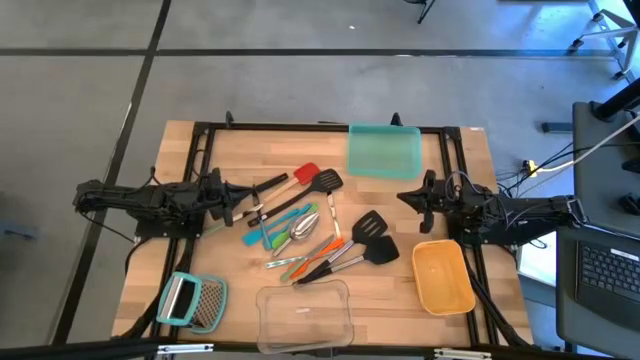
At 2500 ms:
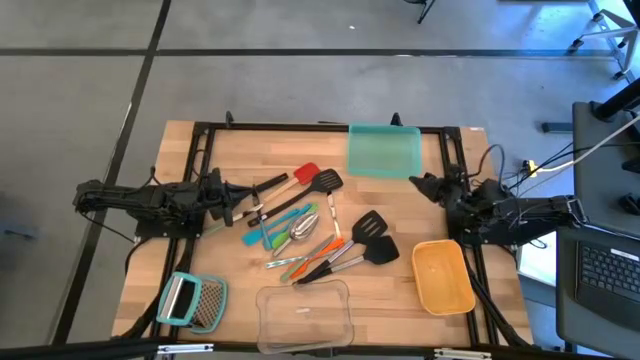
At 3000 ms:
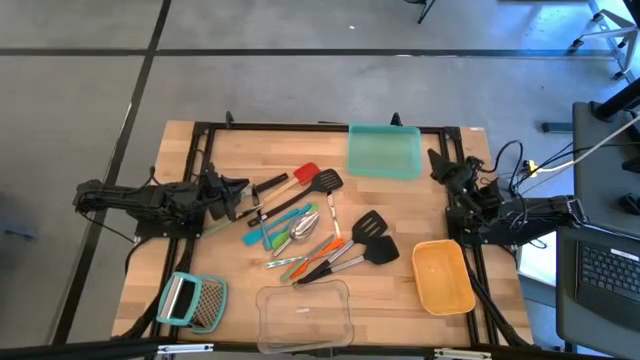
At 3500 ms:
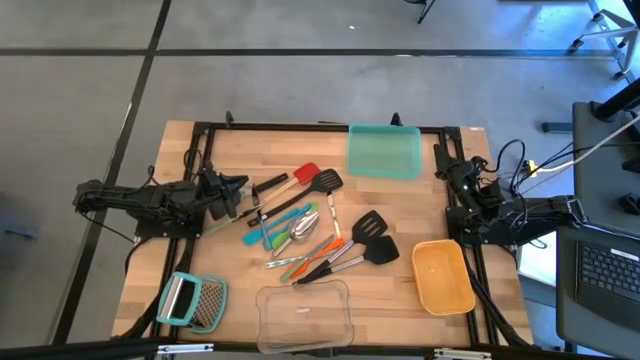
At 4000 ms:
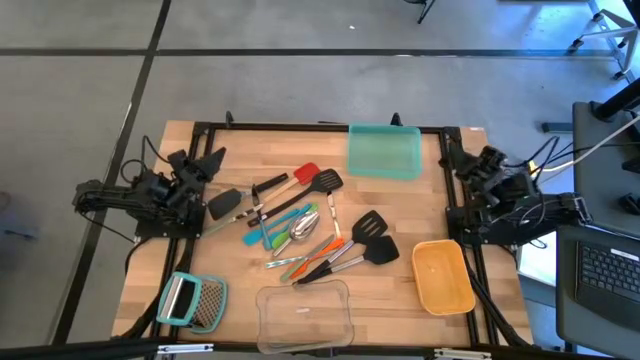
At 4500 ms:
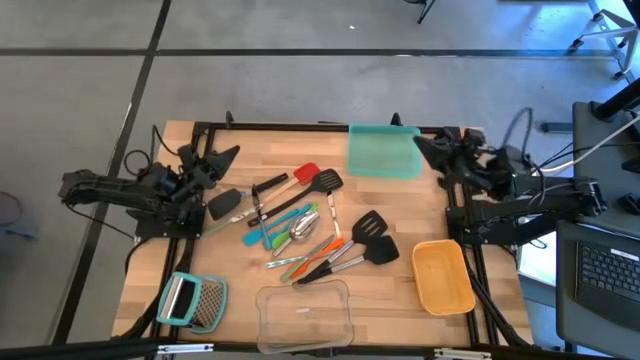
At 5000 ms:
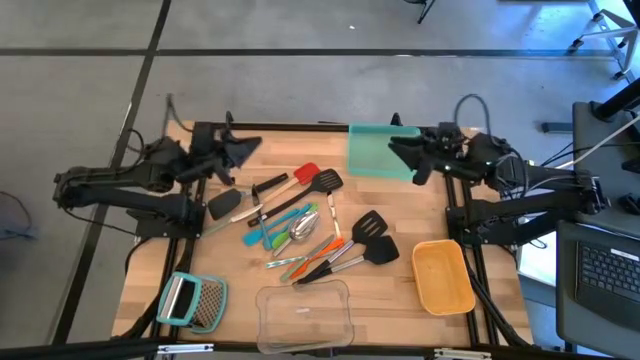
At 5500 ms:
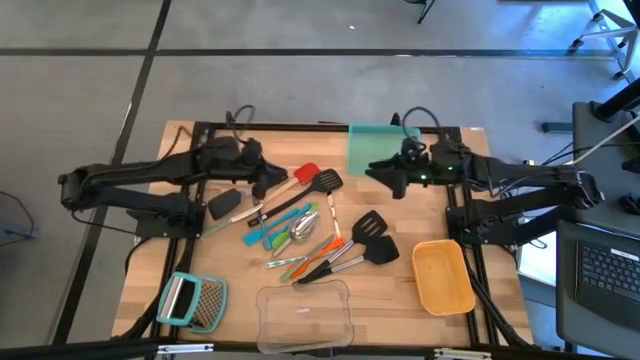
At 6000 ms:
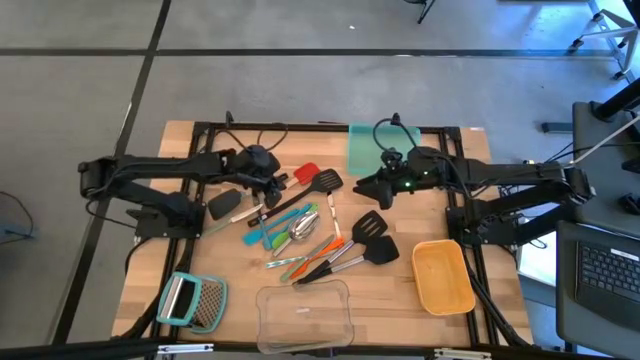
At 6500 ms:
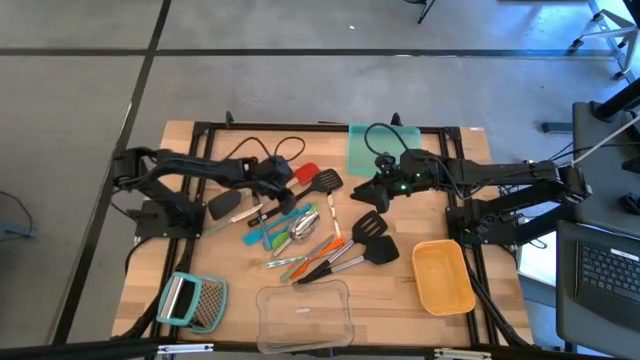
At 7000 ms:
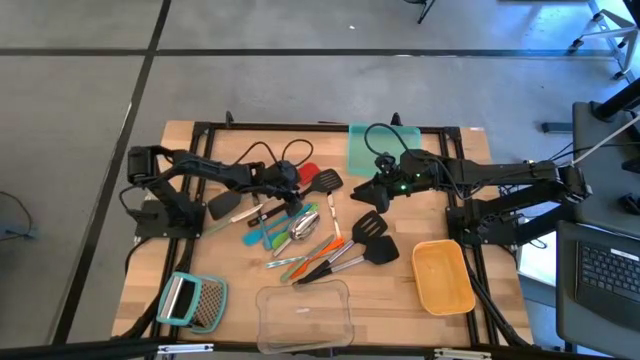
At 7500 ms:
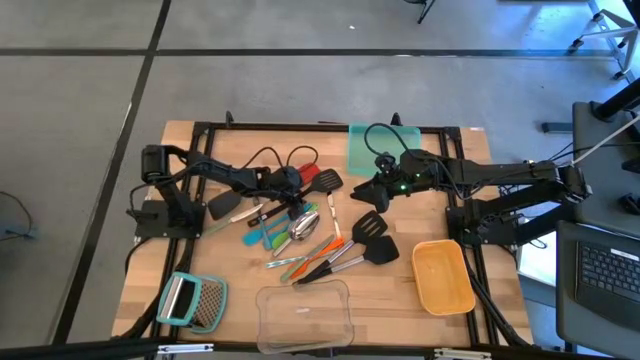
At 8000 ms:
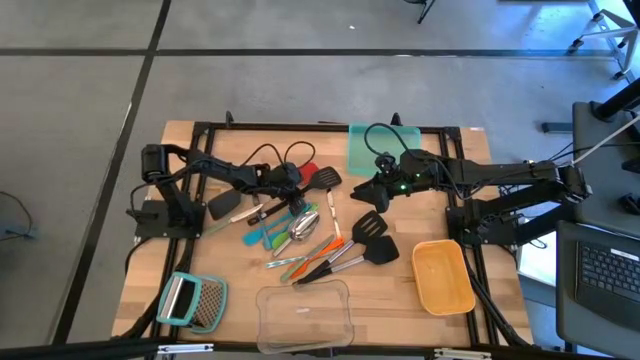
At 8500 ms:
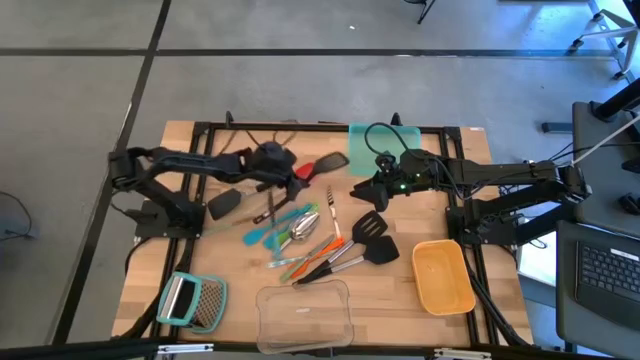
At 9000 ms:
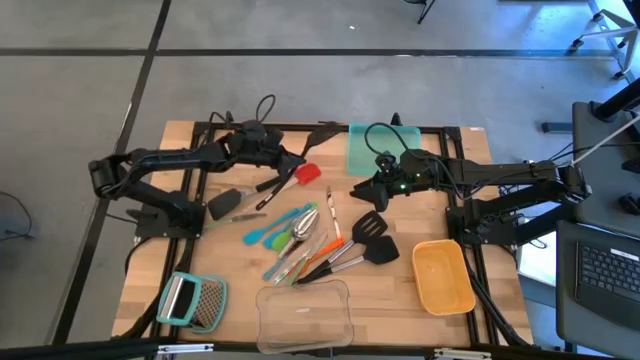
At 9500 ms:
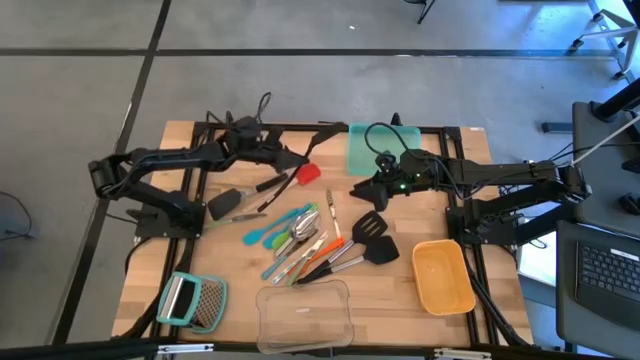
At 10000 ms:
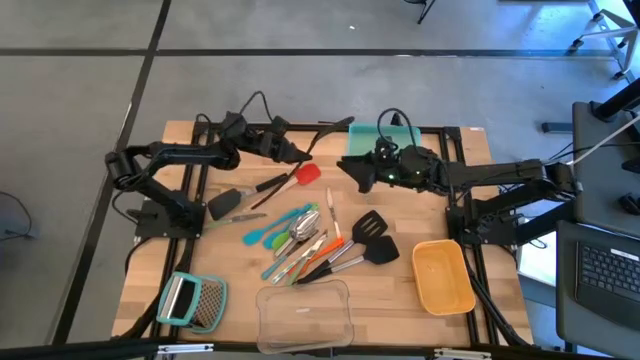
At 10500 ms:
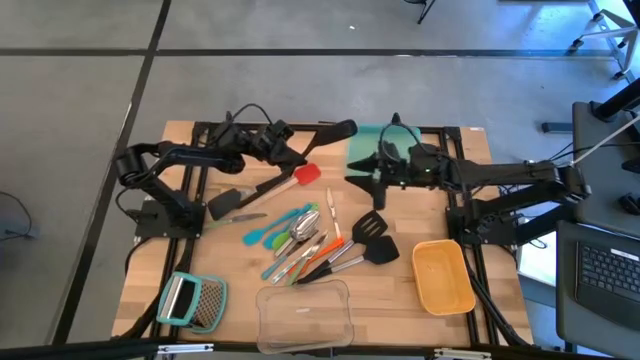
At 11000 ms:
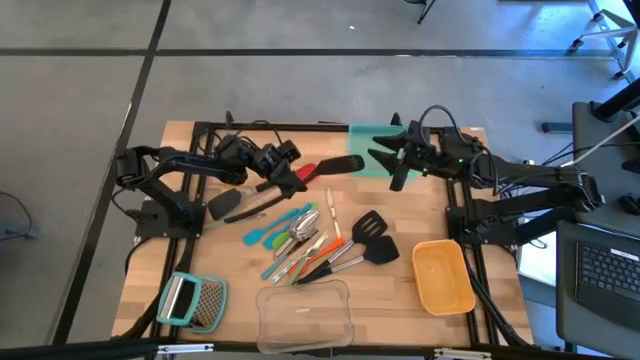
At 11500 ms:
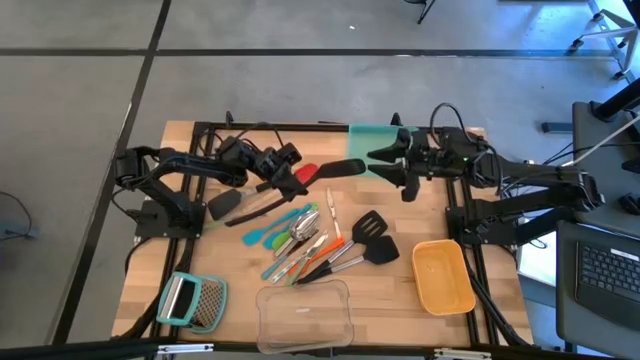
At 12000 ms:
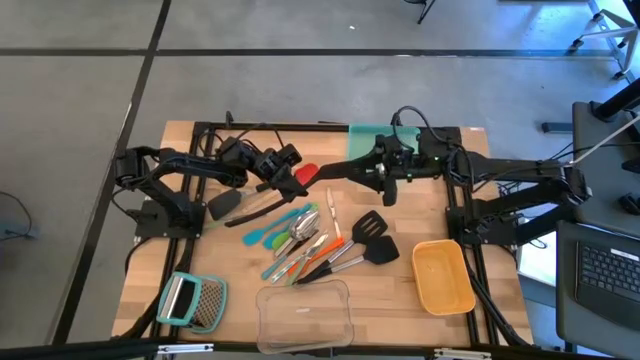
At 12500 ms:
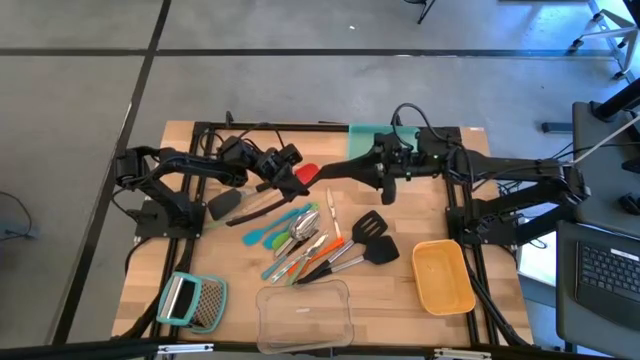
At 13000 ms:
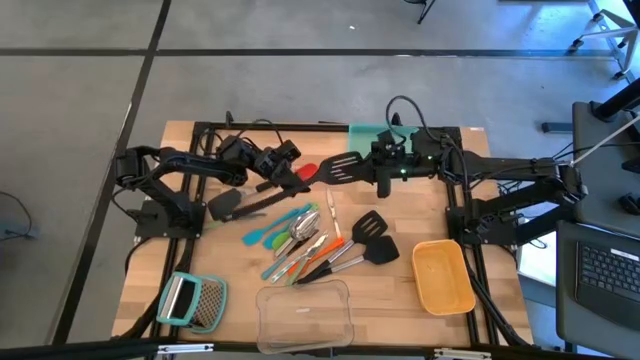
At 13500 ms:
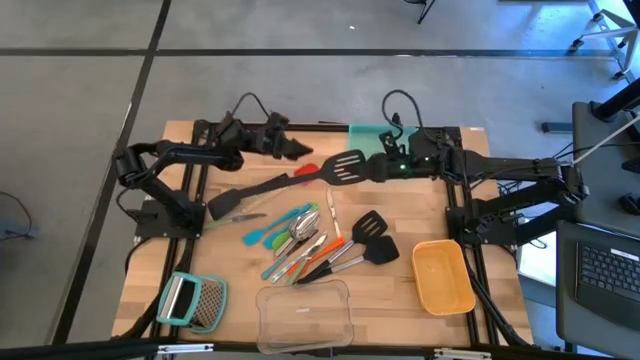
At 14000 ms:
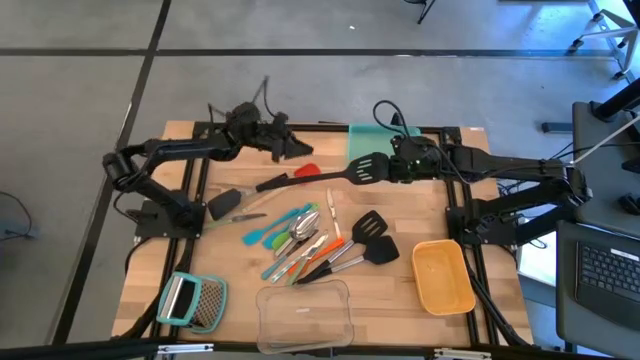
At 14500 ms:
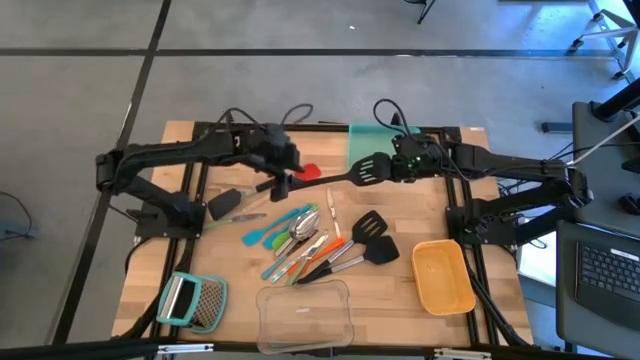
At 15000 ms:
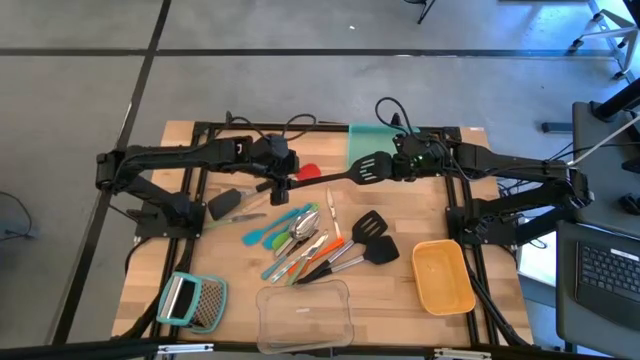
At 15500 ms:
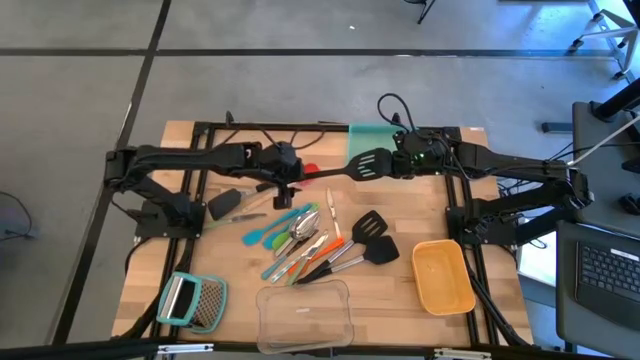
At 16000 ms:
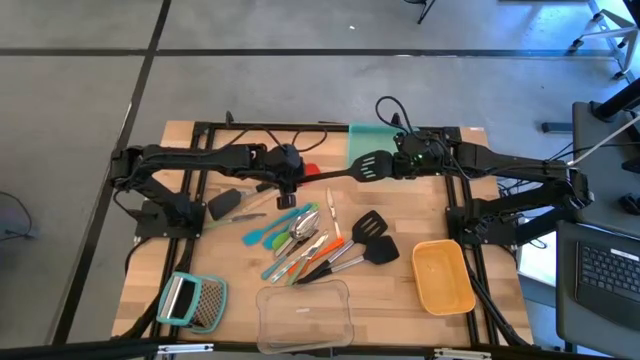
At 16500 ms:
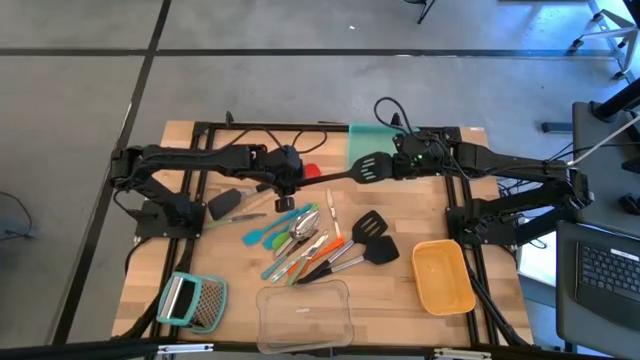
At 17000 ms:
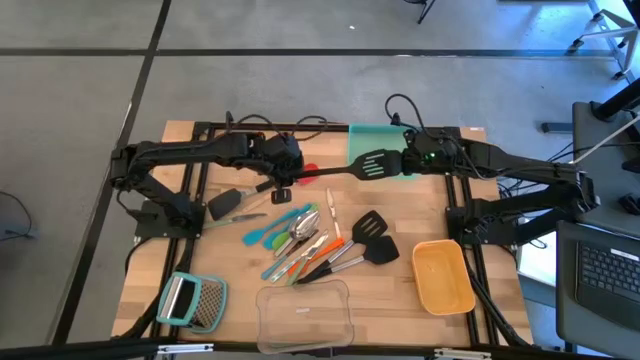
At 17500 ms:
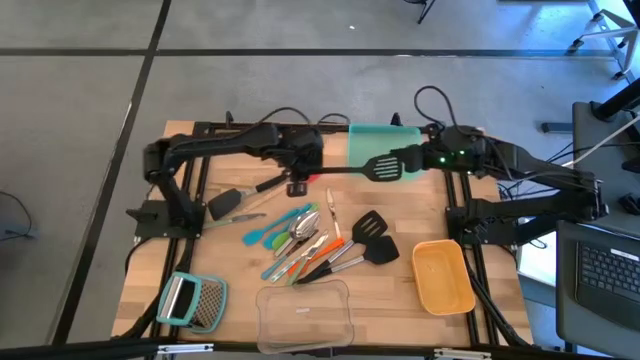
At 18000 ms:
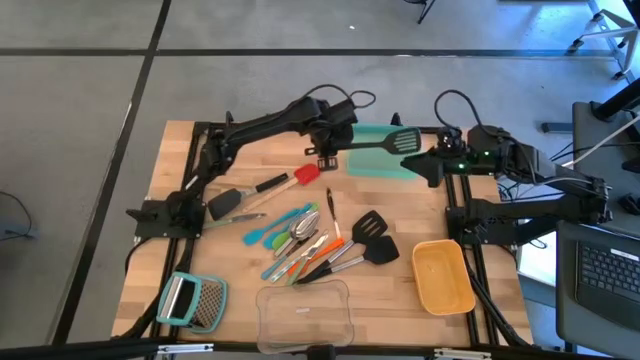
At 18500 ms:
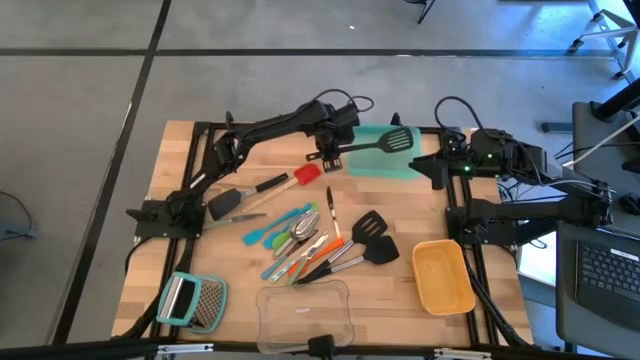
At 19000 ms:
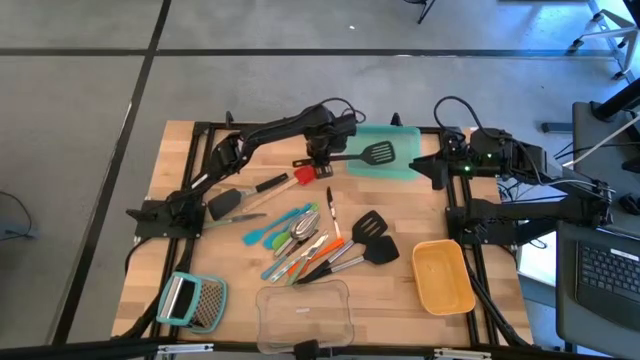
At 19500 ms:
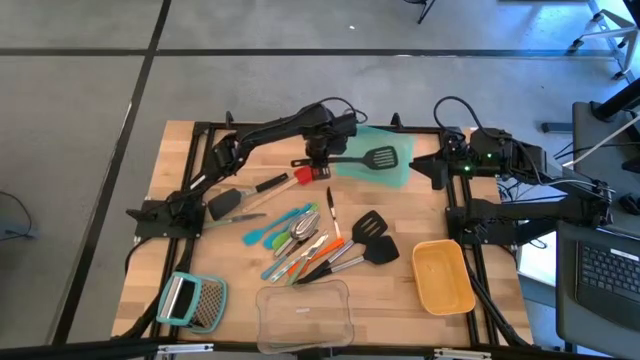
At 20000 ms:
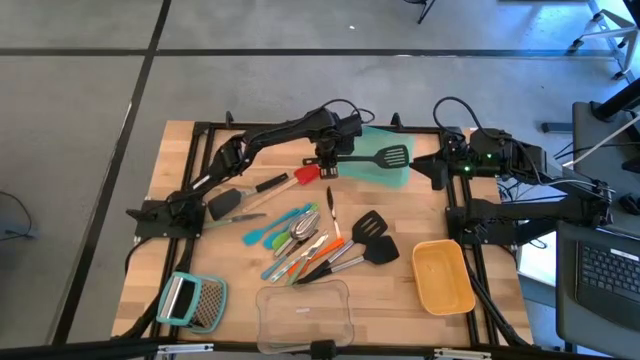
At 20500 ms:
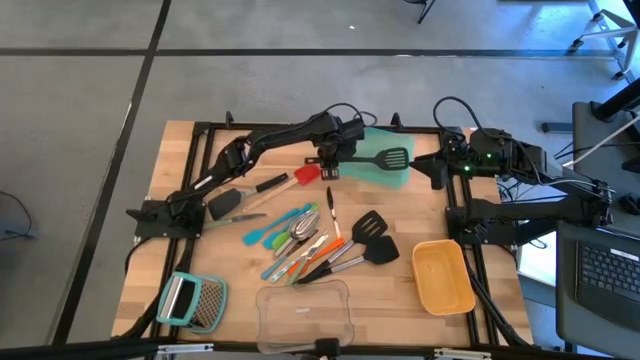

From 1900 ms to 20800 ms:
Task: Pick & Place Kitchen Items
Put the black spatula into the green bin
